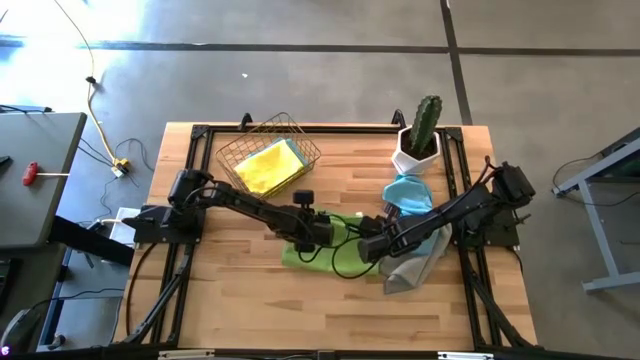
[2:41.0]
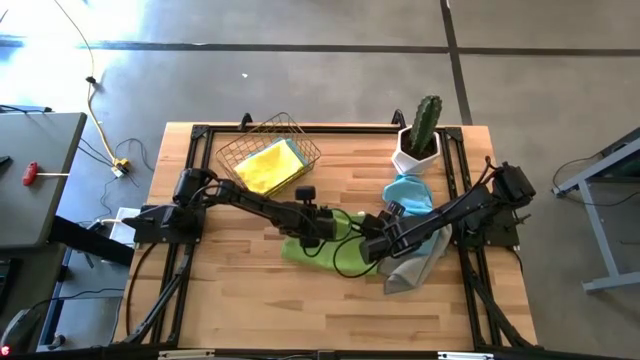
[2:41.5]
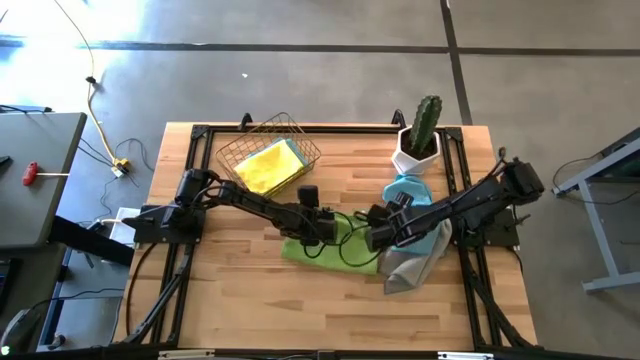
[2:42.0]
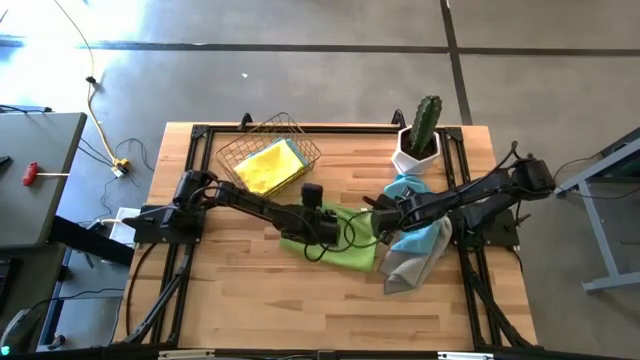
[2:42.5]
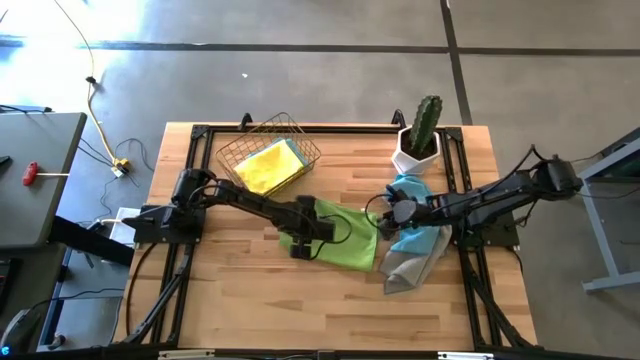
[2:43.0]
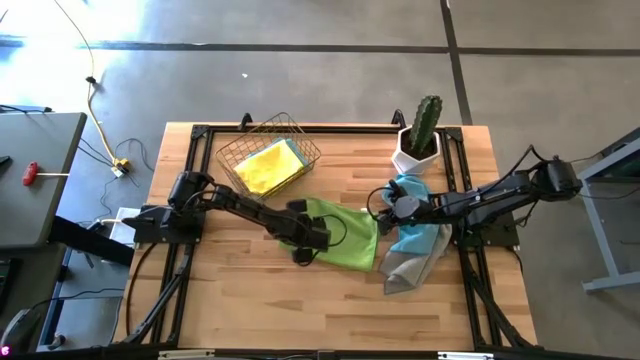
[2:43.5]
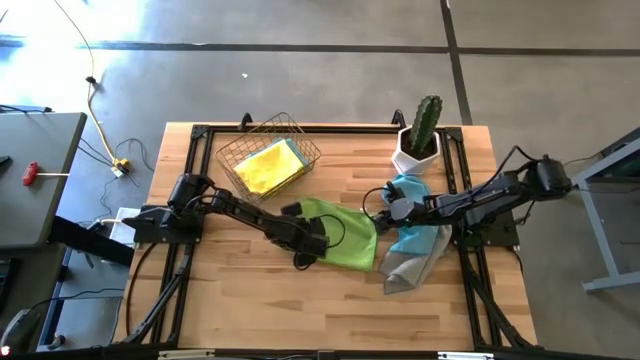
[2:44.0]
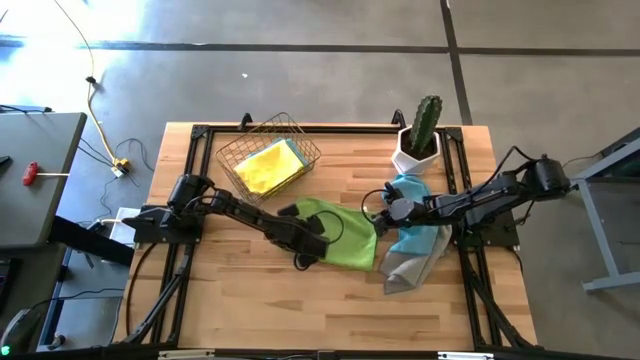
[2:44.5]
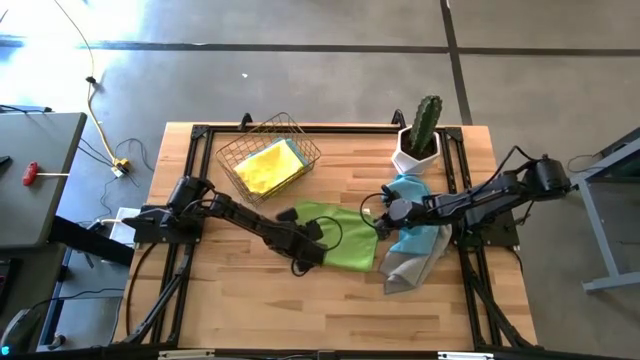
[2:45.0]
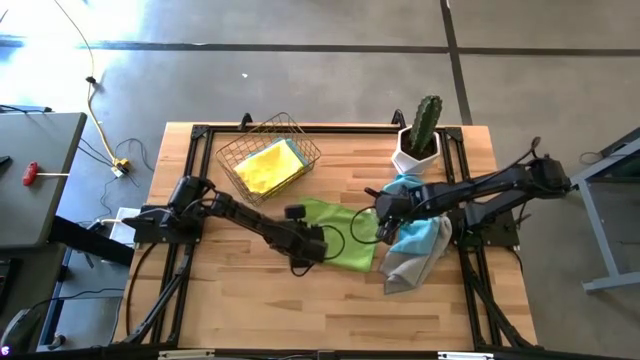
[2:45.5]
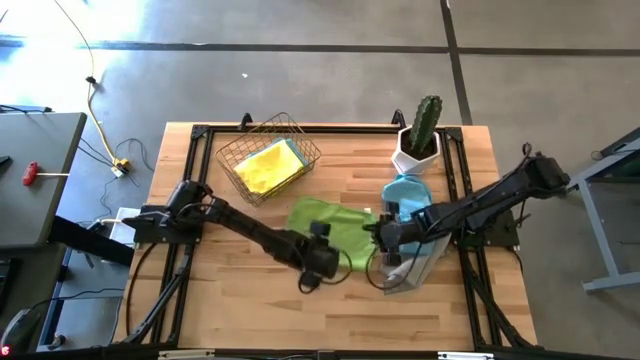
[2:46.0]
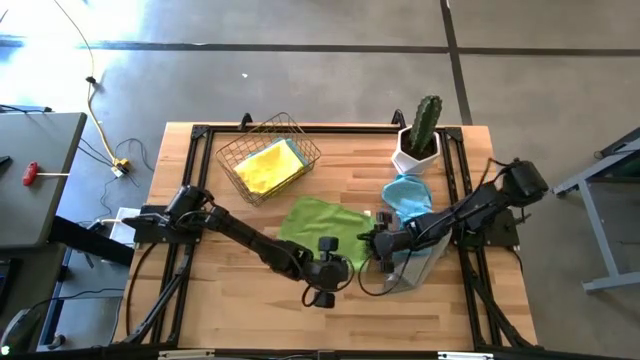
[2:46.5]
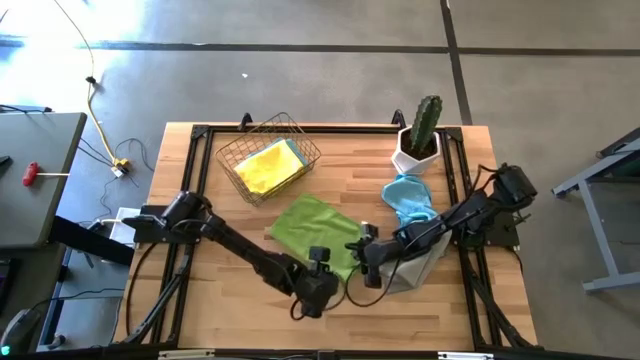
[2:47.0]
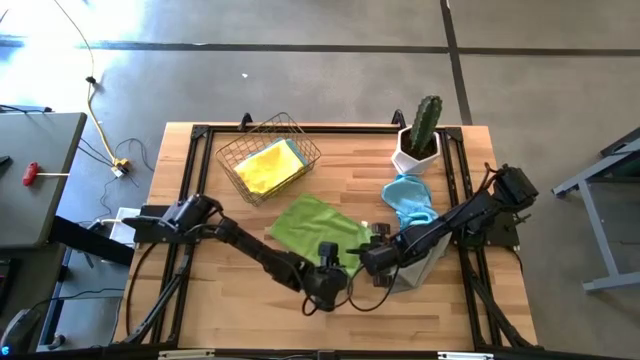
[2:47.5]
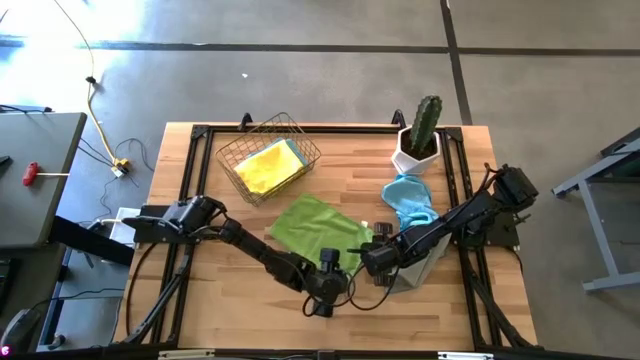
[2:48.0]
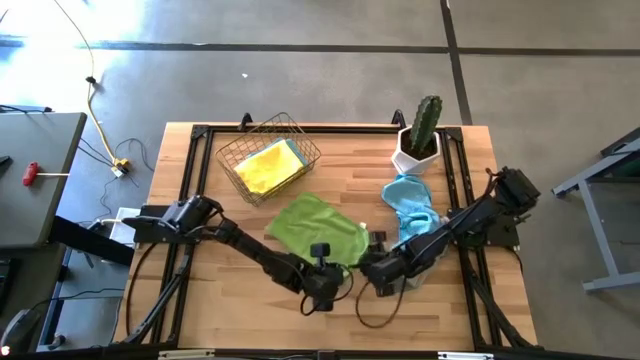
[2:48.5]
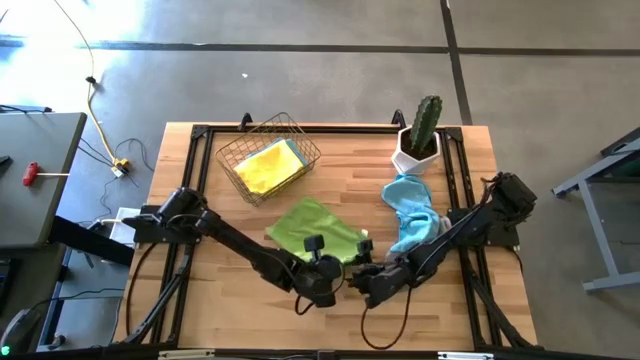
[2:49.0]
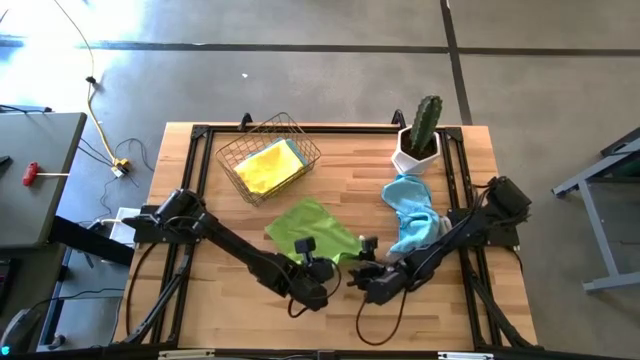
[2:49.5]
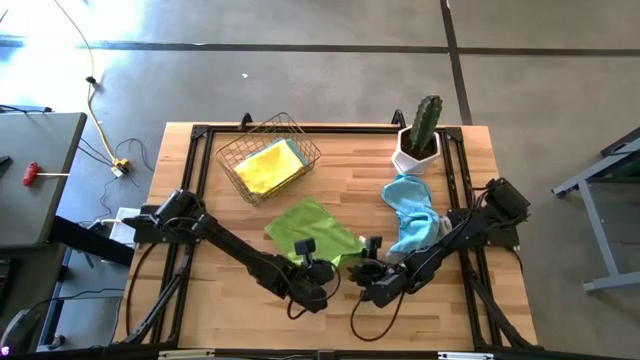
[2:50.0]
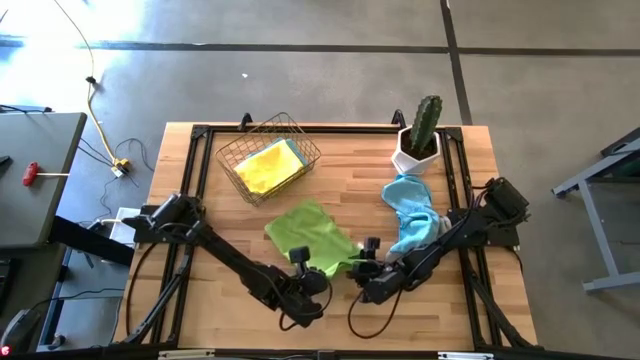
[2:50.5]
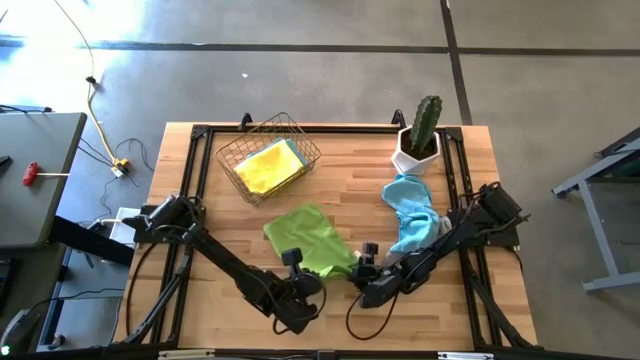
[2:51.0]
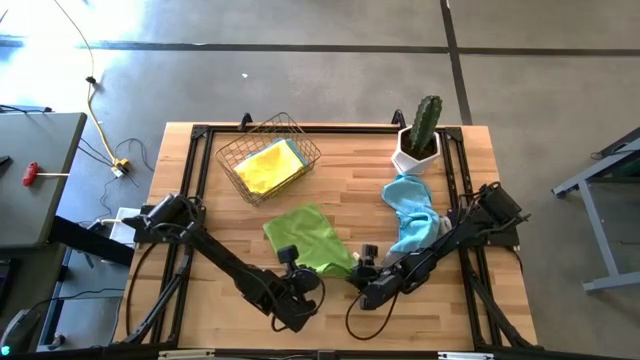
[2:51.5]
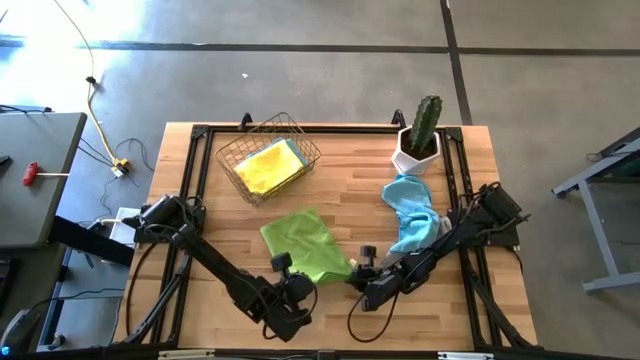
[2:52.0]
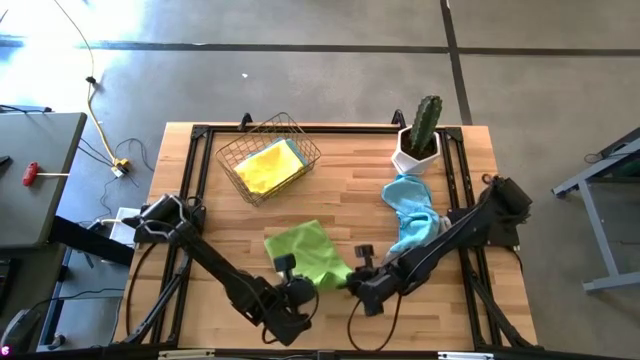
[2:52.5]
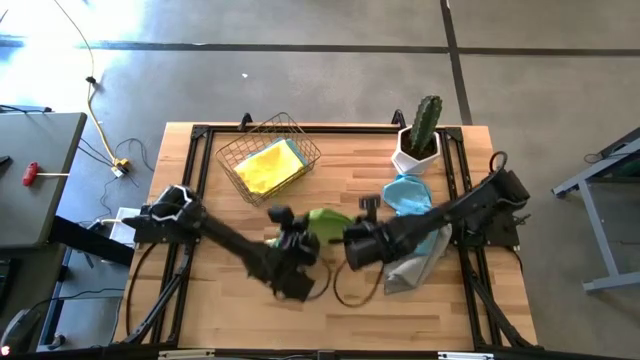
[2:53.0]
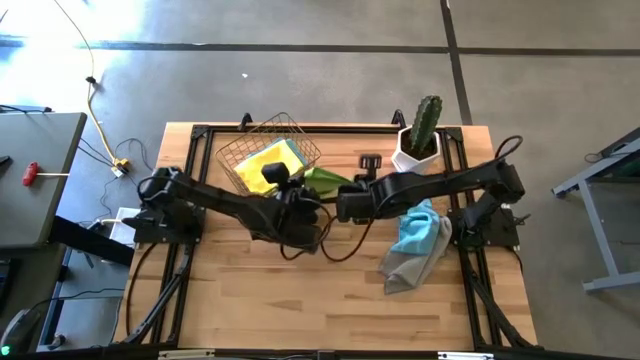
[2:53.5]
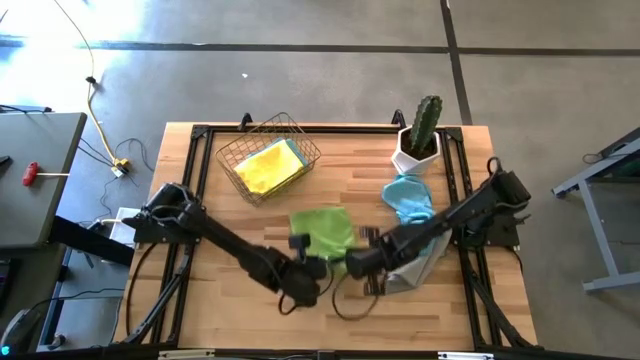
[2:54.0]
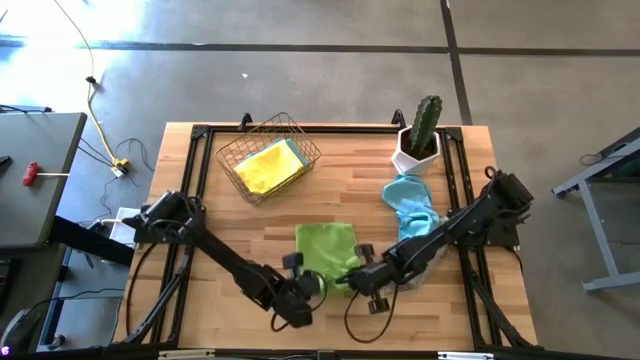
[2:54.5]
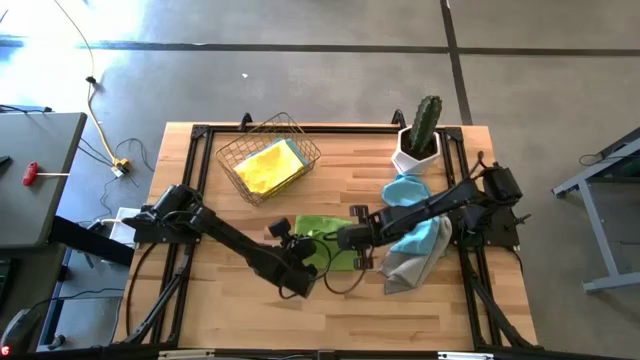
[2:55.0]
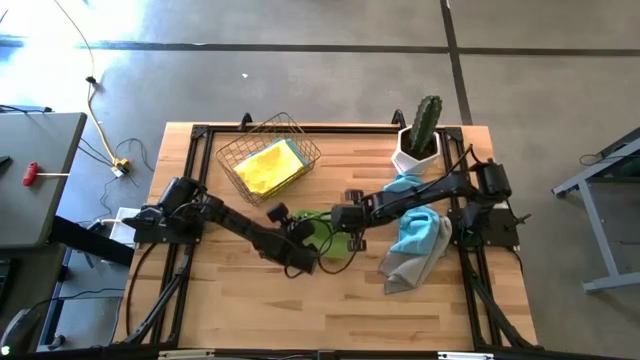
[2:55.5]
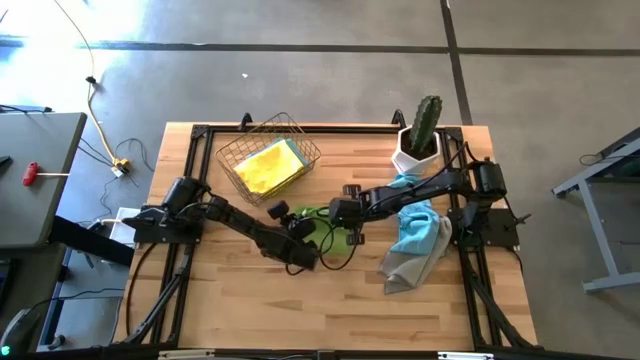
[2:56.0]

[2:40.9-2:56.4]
Task: Fold microfiber towels
Fold the green microfiber towel

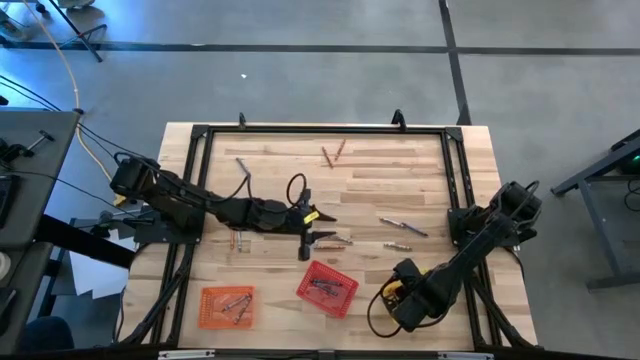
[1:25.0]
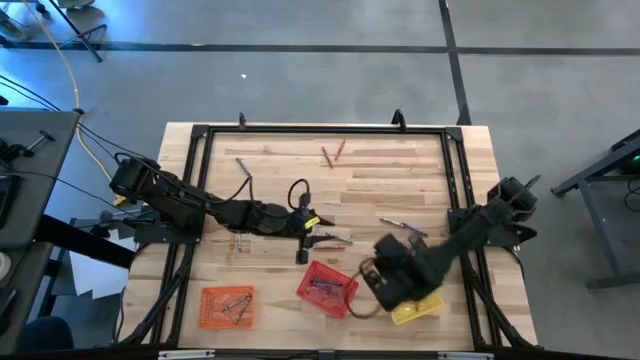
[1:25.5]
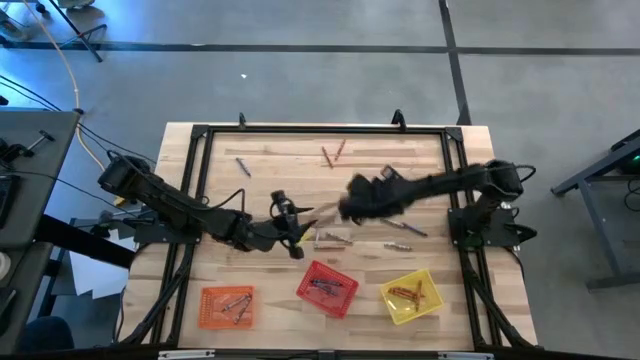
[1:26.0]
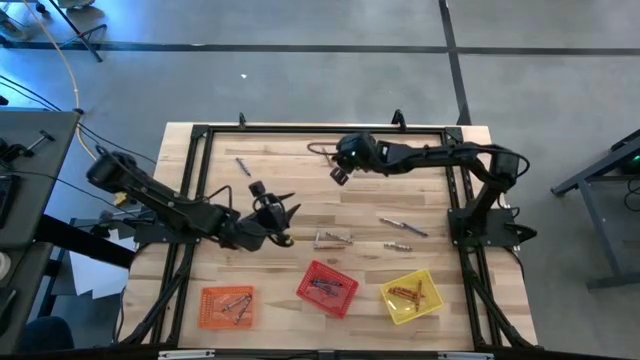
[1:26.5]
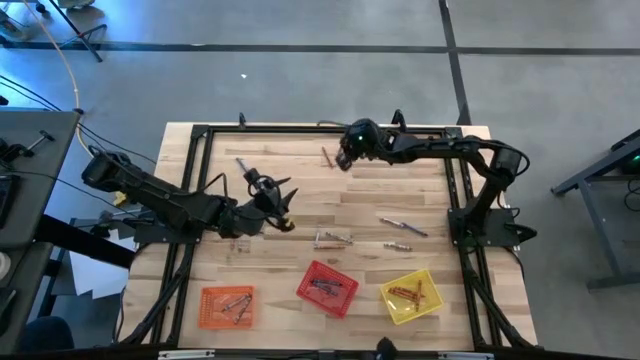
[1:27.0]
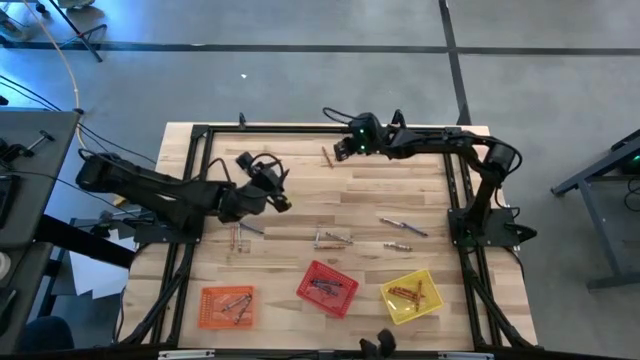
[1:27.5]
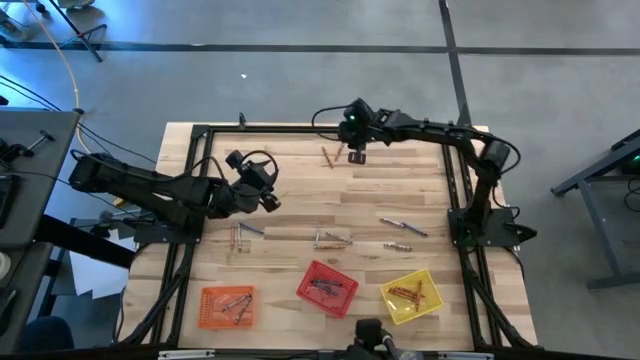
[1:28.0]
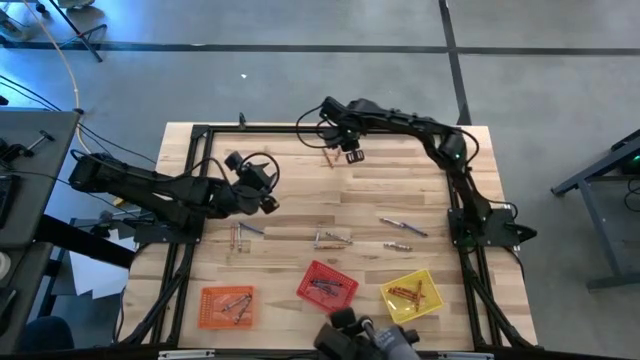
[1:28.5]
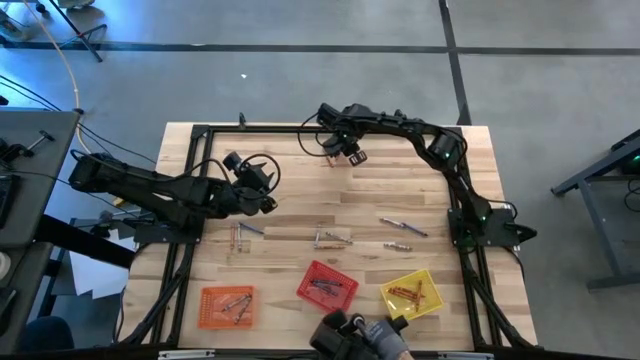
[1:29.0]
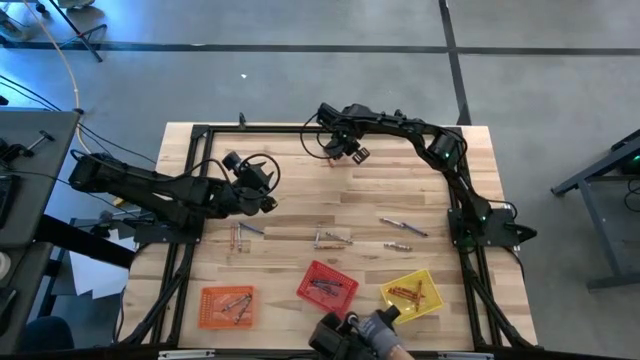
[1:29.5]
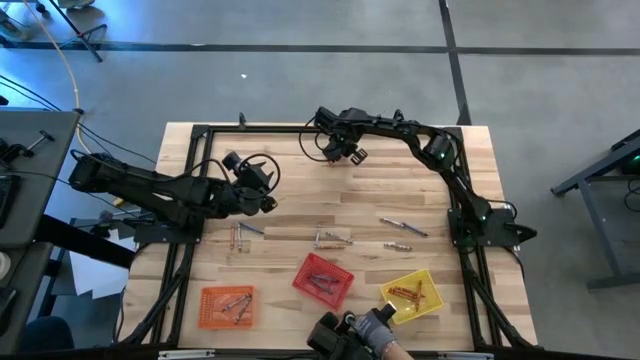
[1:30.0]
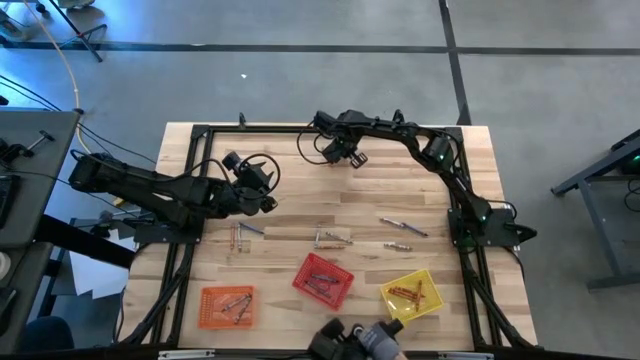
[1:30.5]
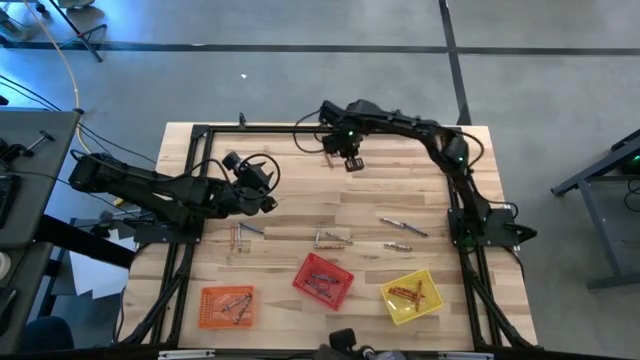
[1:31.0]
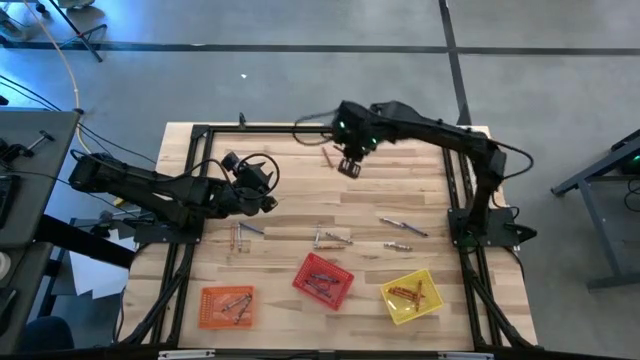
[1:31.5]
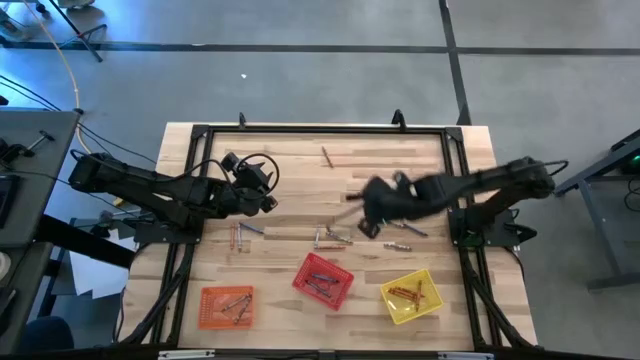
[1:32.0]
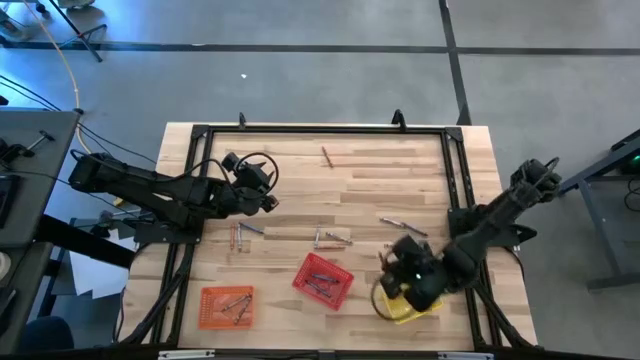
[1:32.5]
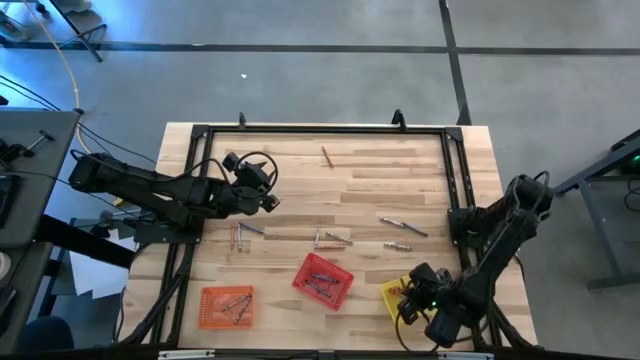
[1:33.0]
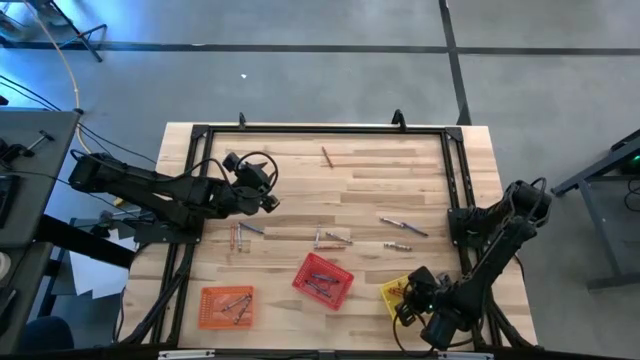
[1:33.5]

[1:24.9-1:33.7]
Task: Sort crayons
Put the orange crayon into the yellow bin
